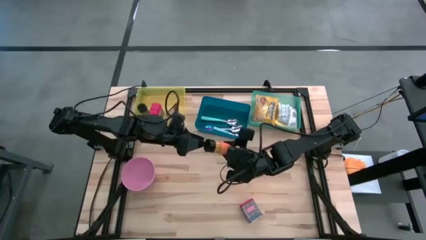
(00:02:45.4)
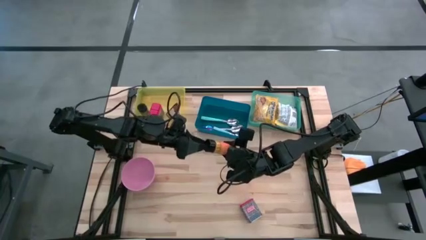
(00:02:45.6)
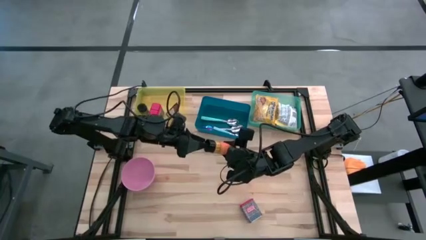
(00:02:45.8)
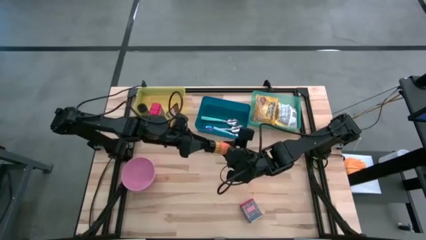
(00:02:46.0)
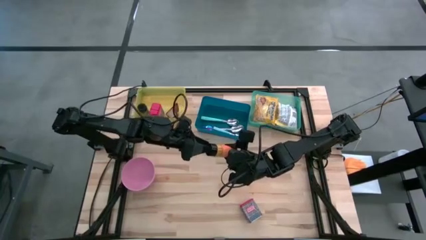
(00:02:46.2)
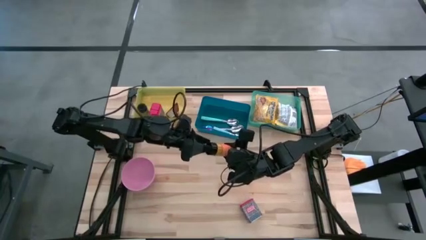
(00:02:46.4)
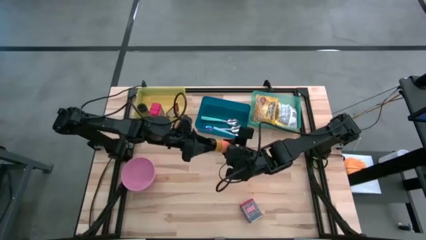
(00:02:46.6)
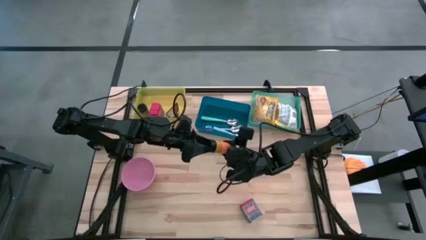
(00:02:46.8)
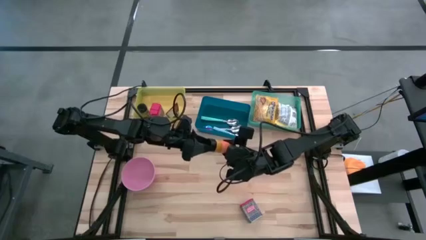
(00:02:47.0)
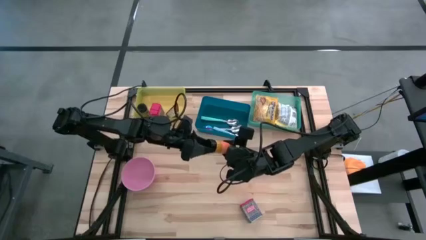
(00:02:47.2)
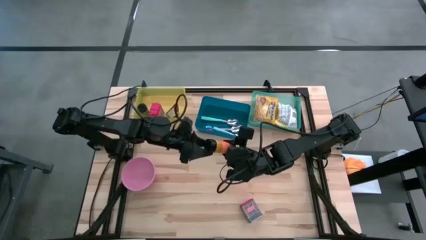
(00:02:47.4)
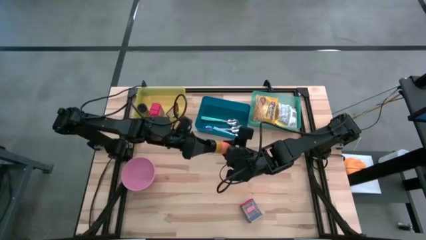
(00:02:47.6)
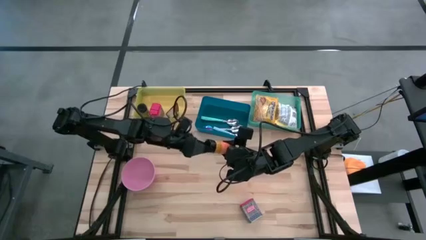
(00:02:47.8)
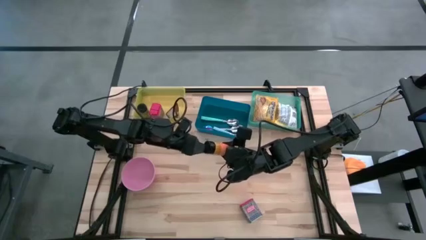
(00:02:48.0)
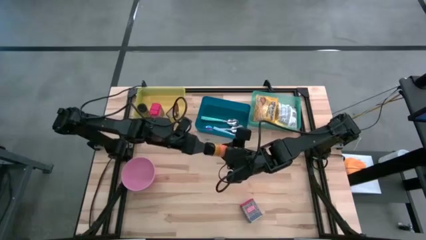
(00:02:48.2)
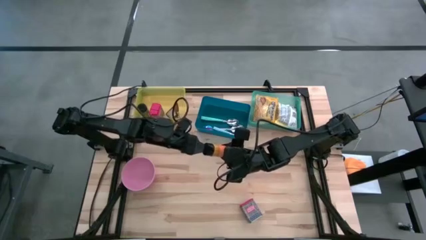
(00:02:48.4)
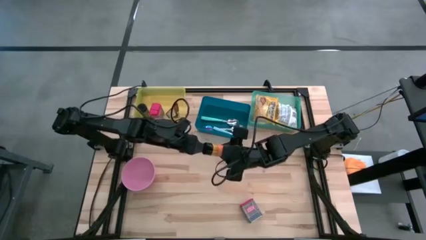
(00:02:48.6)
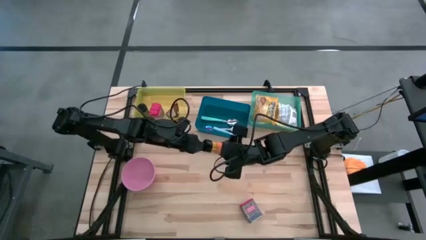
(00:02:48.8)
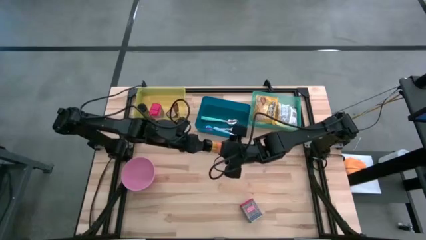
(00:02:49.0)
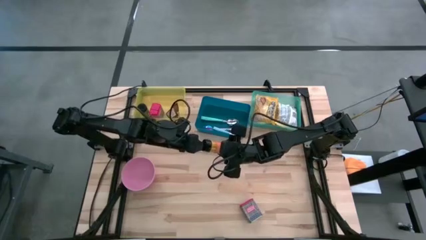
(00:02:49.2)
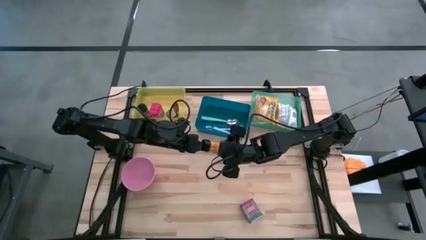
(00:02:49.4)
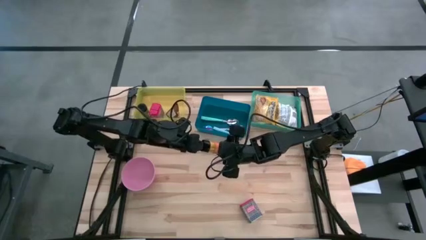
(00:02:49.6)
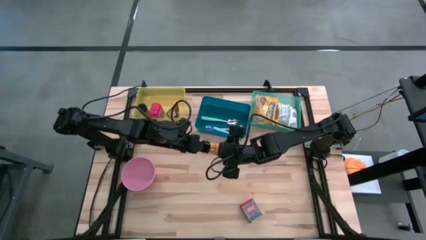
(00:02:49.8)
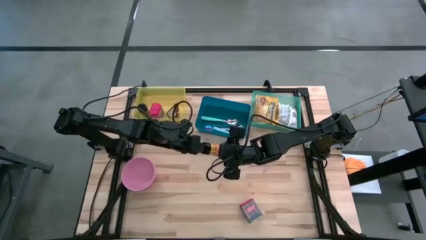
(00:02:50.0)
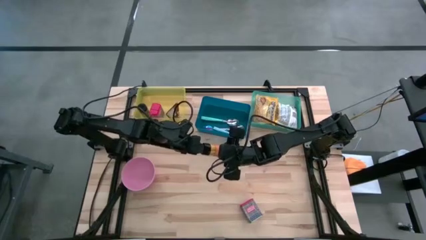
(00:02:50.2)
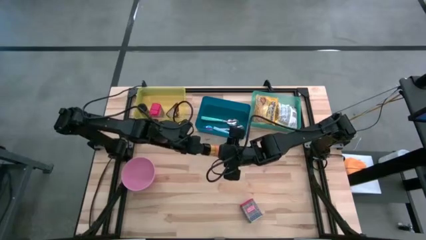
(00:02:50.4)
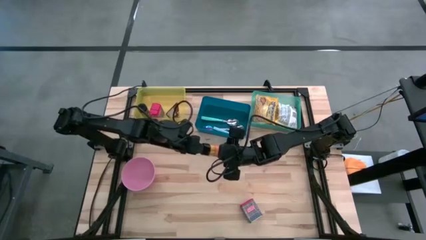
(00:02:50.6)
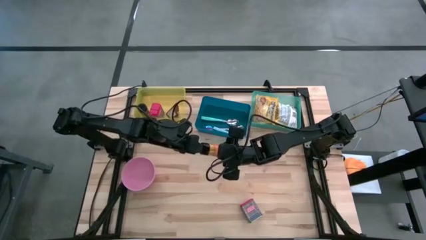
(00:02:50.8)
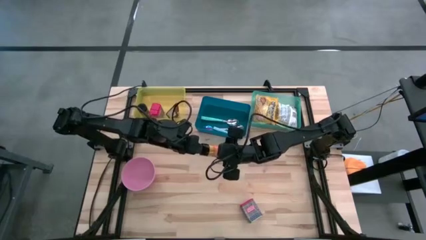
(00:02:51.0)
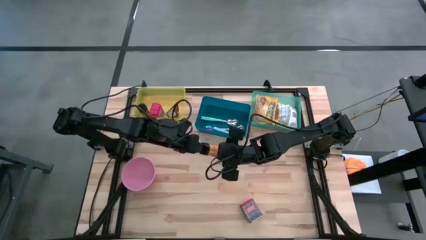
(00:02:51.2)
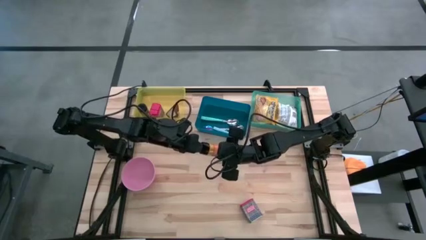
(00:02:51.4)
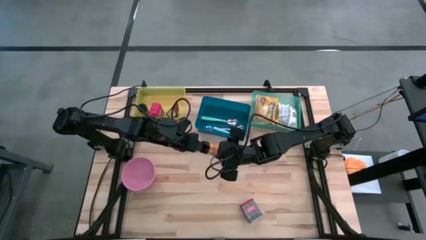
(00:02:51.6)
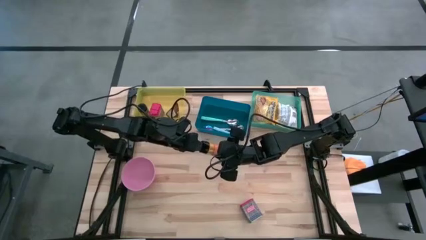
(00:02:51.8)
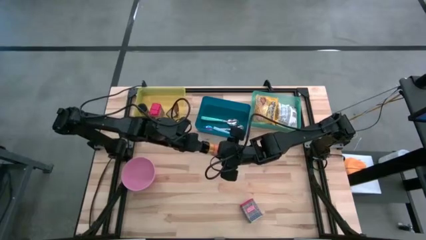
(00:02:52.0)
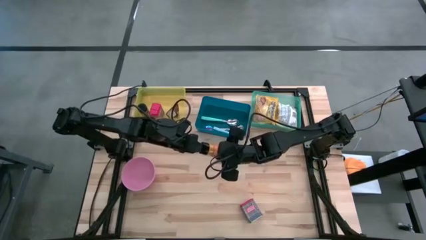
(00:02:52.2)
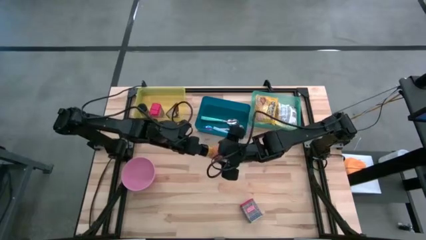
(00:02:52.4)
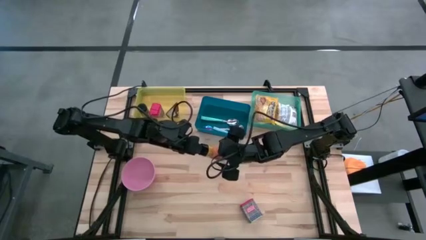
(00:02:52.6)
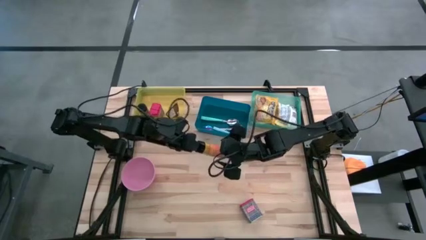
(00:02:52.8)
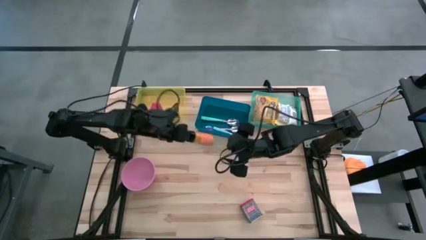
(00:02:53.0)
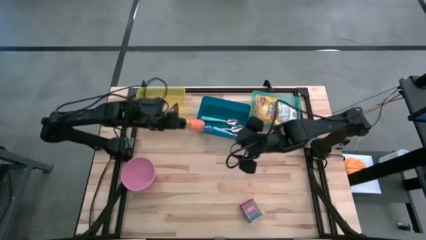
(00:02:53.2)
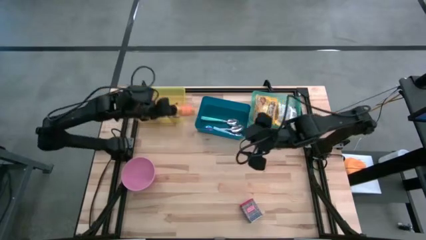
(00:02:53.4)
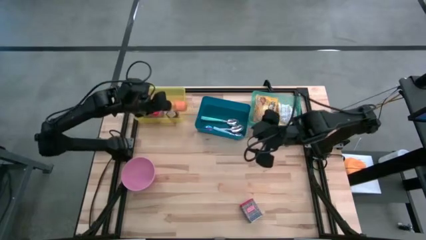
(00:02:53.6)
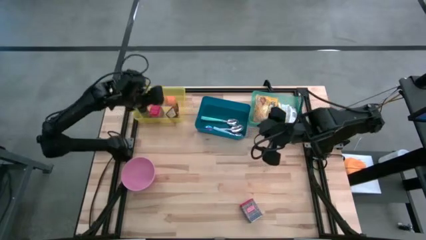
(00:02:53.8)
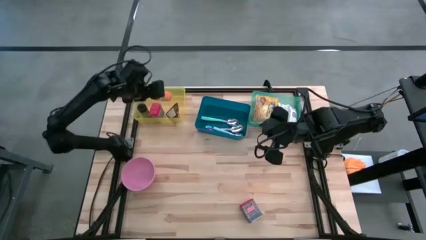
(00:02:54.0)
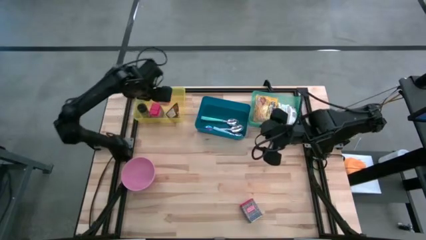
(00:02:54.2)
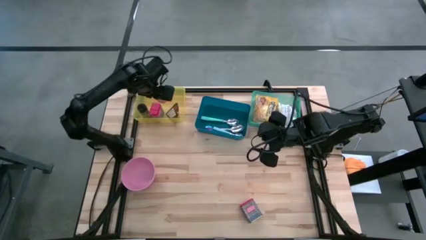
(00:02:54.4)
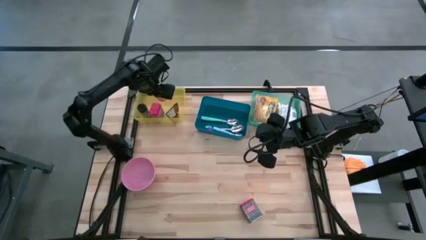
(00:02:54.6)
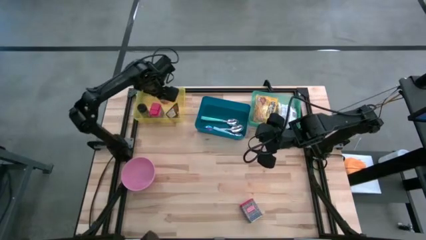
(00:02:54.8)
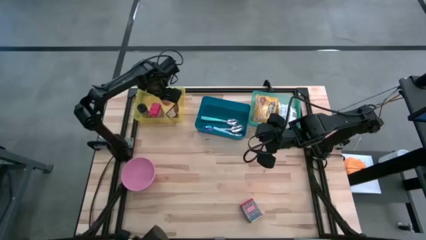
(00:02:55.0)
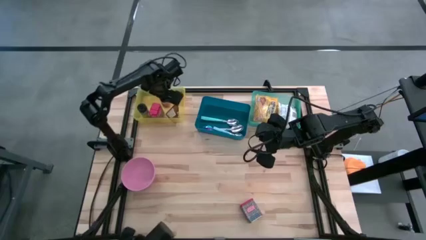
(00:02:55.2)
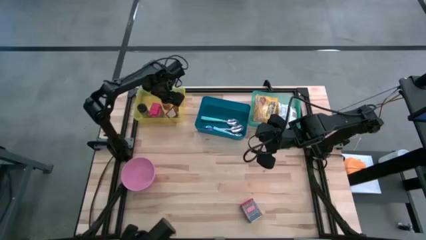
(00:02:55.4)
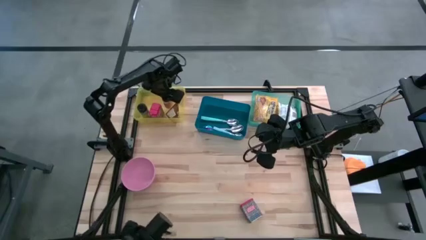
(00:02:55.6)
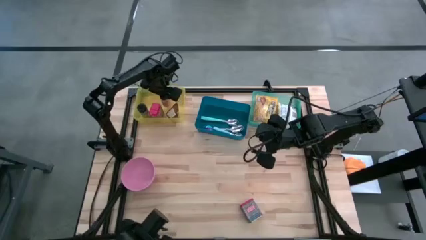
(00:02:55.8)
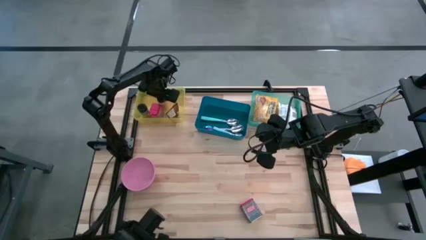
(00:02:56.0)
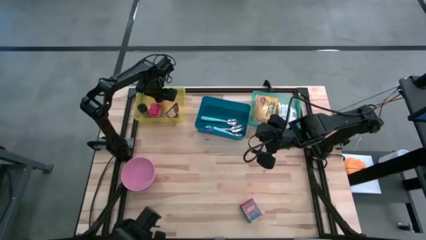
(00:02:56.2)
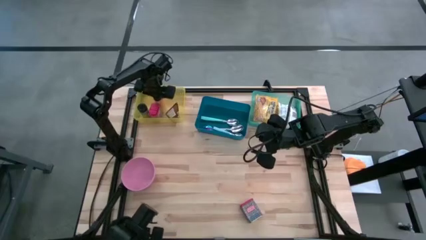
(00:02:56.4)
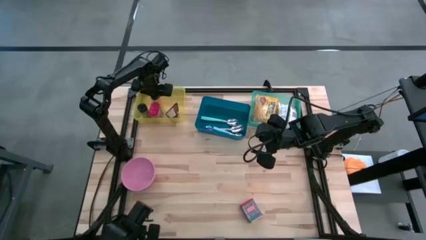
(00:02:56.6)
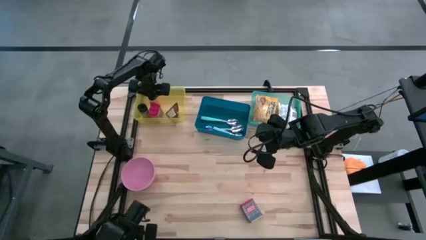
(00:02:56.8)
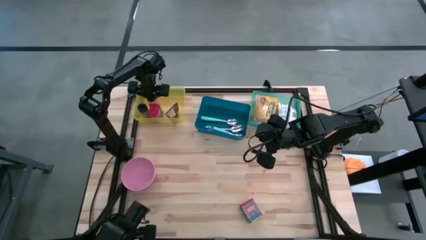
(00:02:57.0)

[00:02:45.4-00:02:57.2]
Put the black seasoning bottle into the yellow bin
